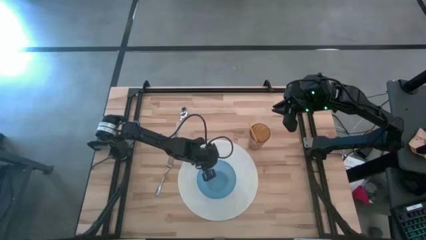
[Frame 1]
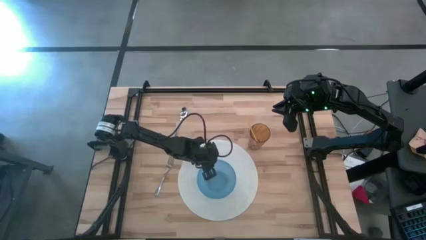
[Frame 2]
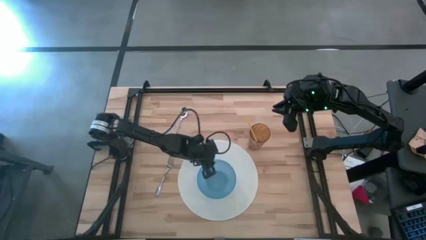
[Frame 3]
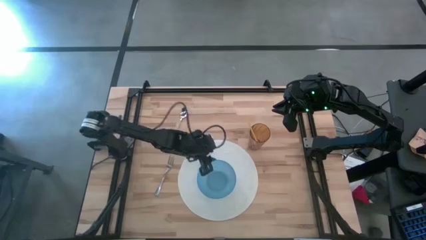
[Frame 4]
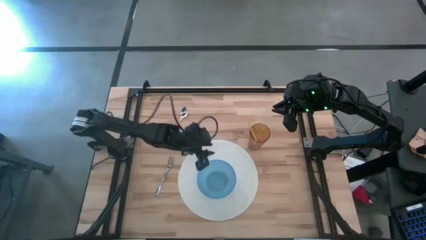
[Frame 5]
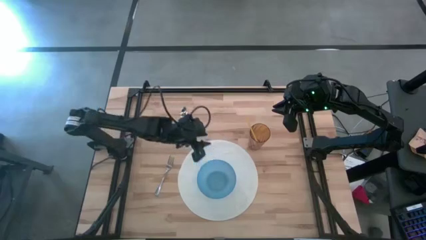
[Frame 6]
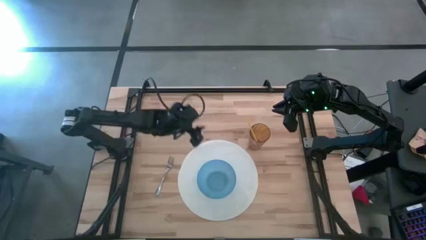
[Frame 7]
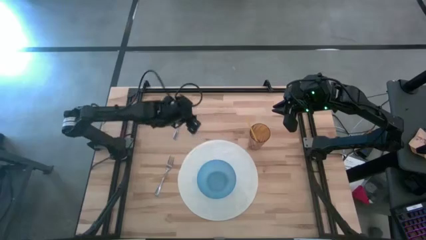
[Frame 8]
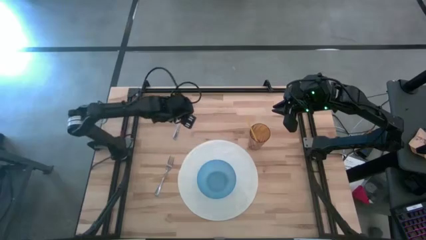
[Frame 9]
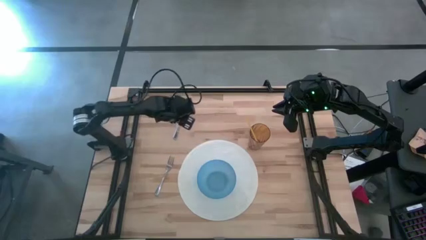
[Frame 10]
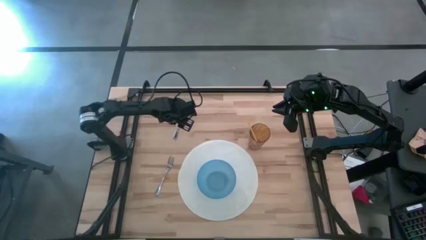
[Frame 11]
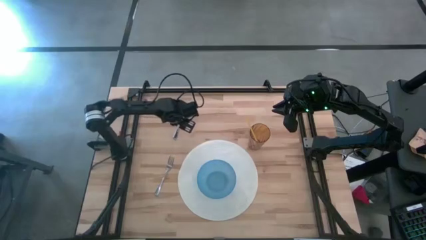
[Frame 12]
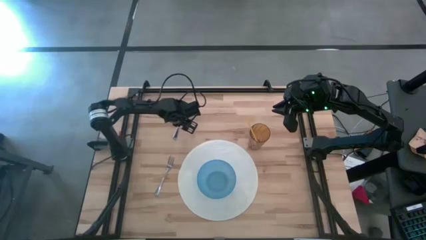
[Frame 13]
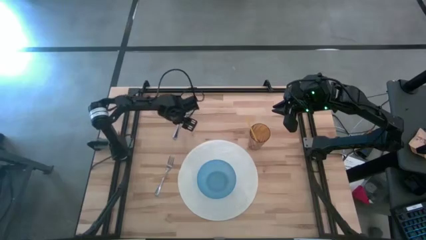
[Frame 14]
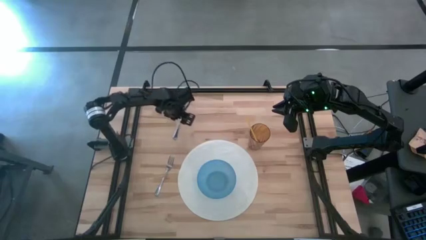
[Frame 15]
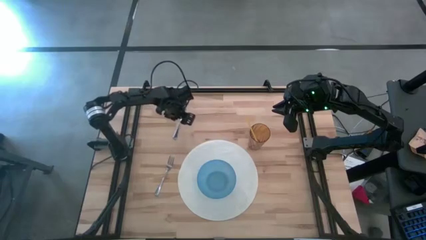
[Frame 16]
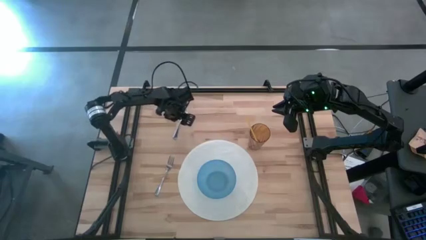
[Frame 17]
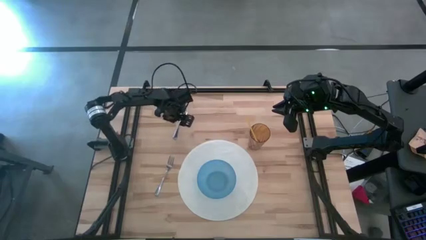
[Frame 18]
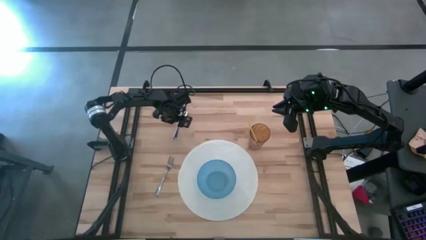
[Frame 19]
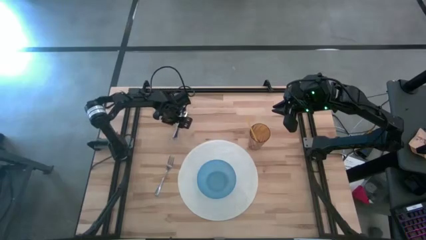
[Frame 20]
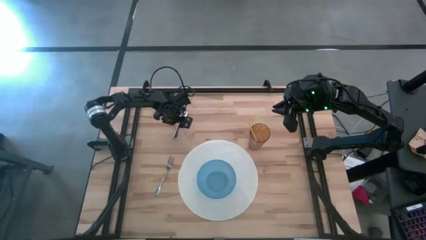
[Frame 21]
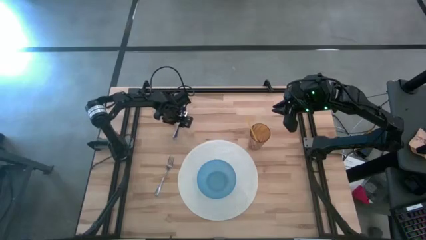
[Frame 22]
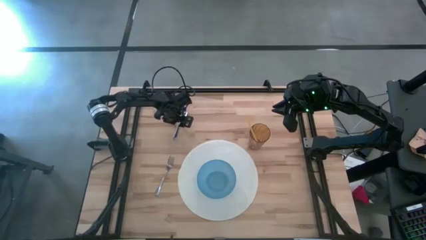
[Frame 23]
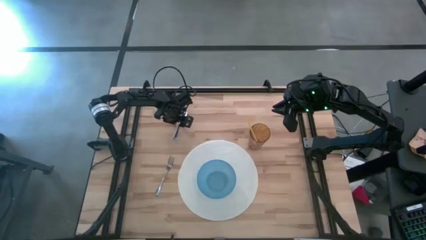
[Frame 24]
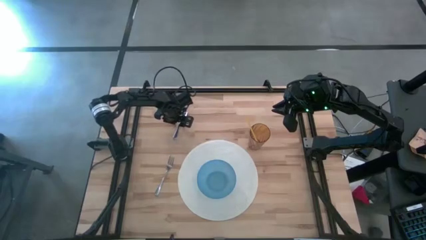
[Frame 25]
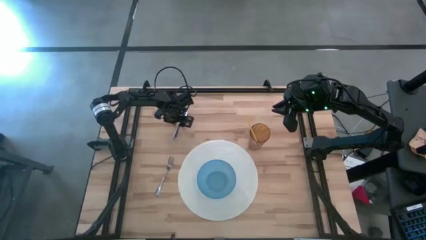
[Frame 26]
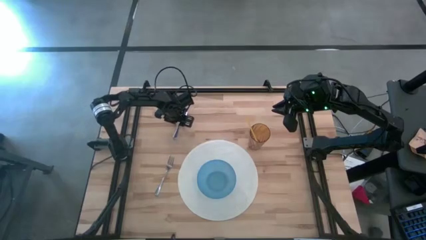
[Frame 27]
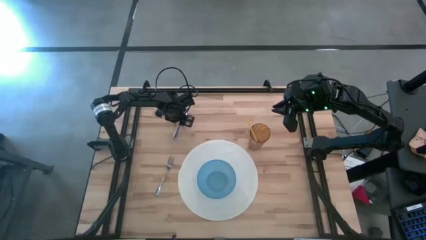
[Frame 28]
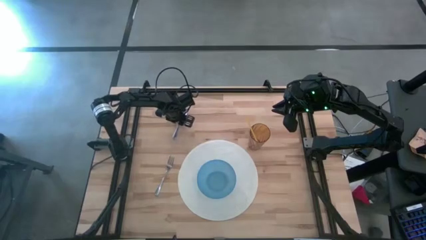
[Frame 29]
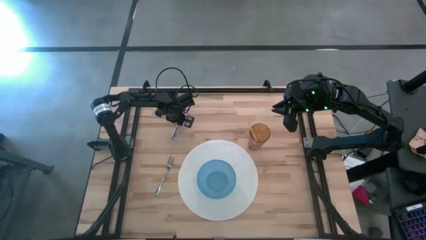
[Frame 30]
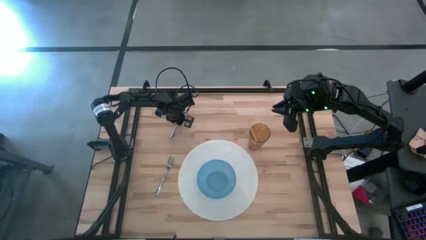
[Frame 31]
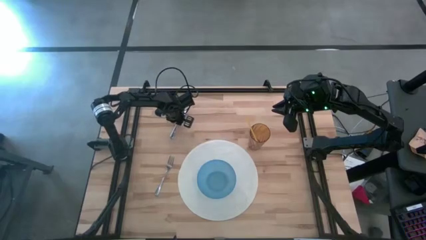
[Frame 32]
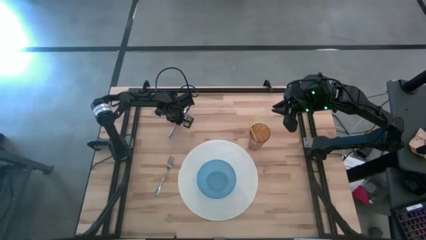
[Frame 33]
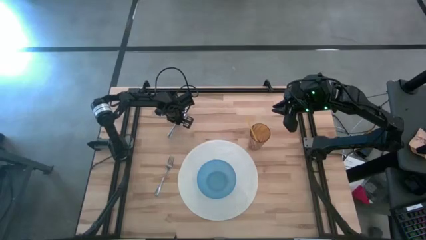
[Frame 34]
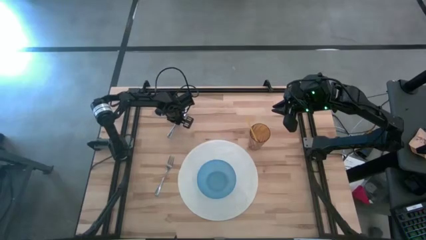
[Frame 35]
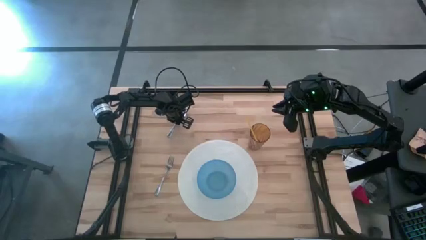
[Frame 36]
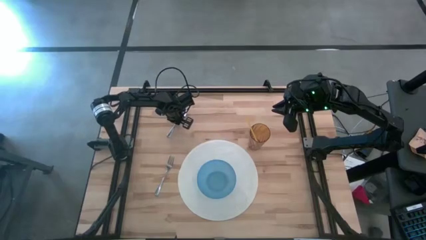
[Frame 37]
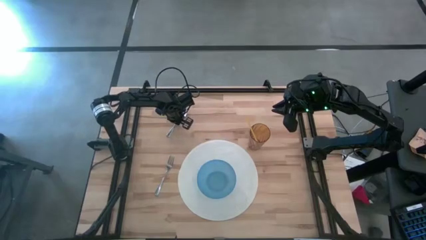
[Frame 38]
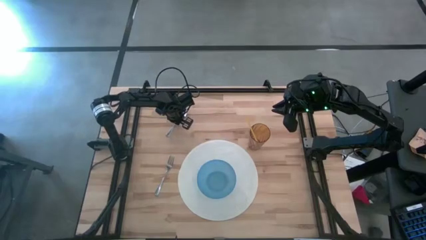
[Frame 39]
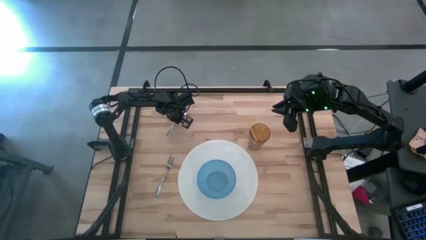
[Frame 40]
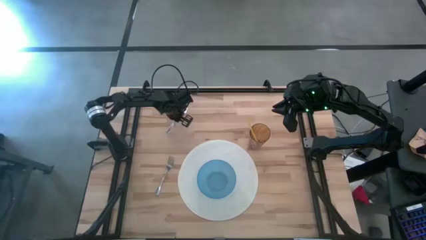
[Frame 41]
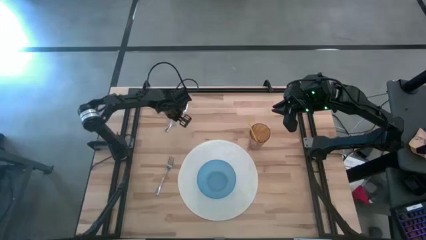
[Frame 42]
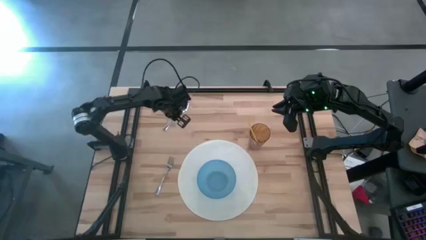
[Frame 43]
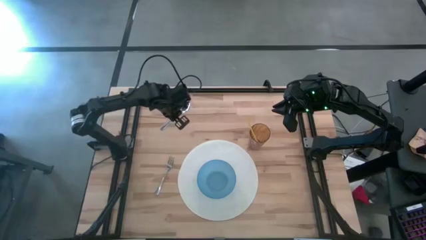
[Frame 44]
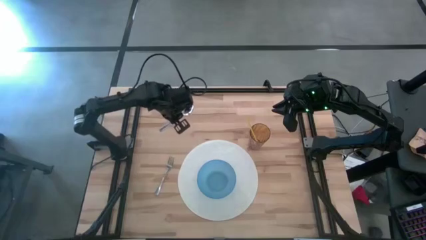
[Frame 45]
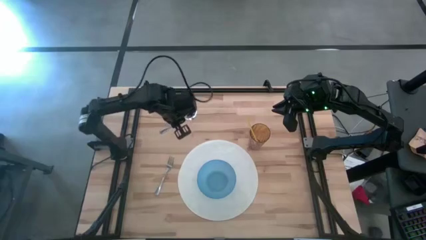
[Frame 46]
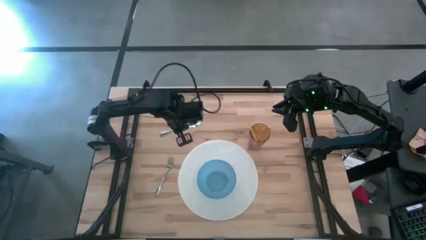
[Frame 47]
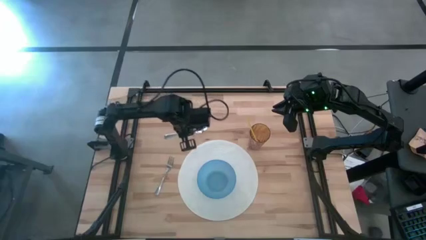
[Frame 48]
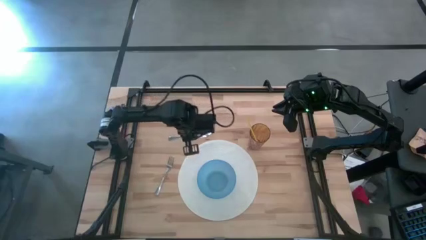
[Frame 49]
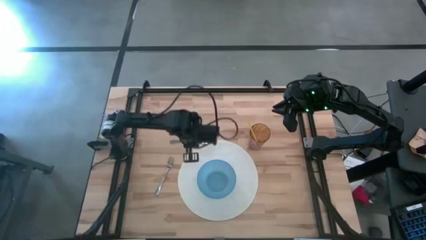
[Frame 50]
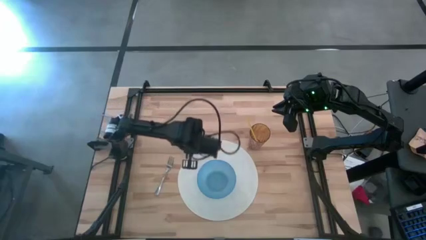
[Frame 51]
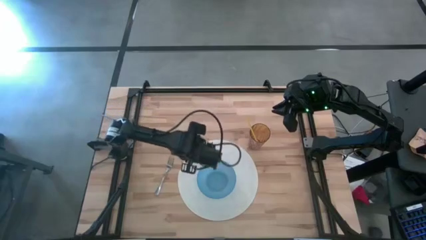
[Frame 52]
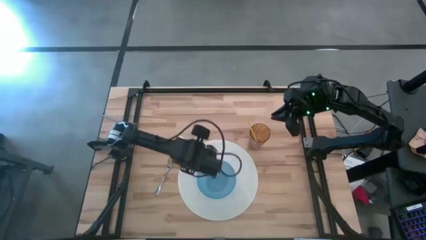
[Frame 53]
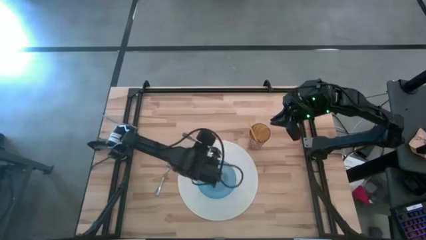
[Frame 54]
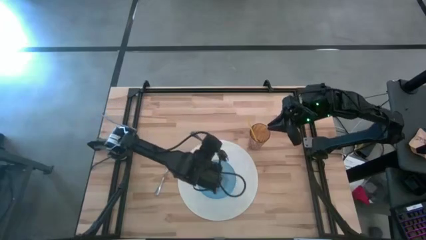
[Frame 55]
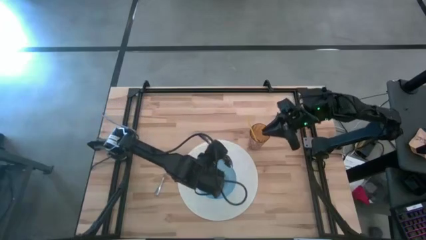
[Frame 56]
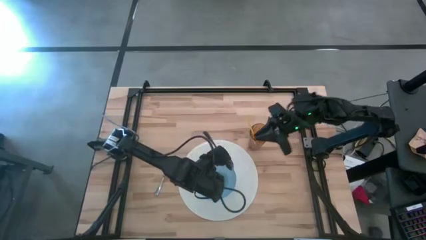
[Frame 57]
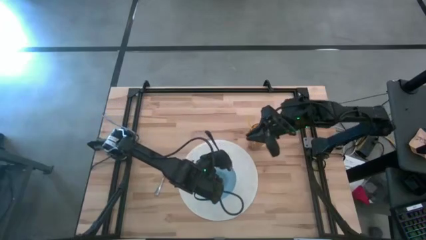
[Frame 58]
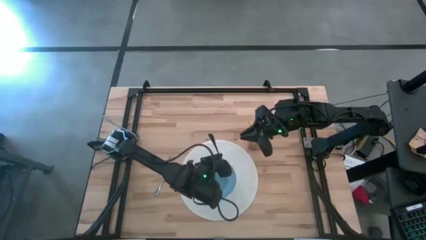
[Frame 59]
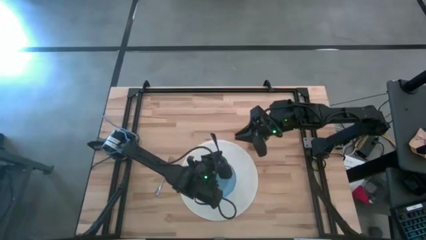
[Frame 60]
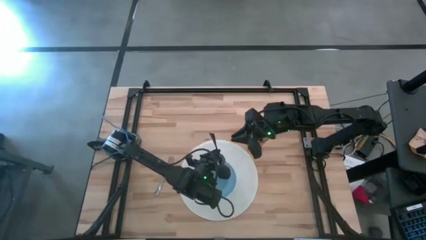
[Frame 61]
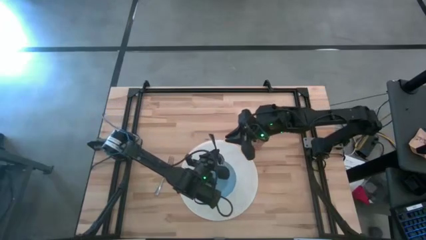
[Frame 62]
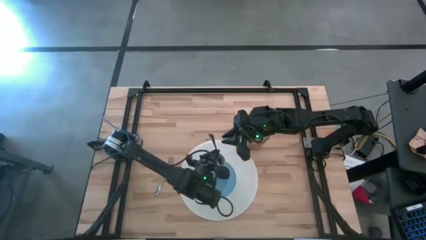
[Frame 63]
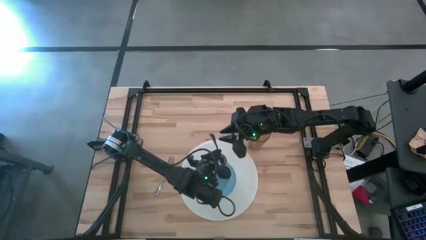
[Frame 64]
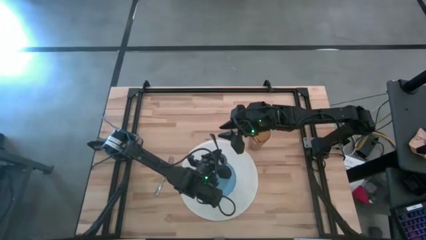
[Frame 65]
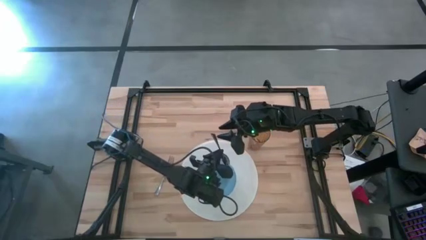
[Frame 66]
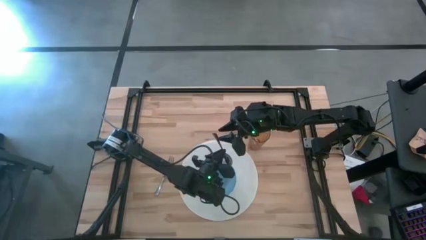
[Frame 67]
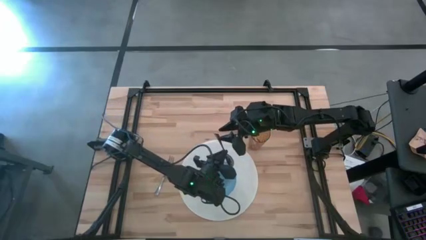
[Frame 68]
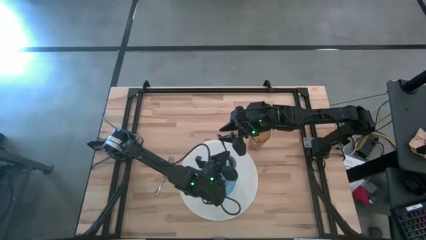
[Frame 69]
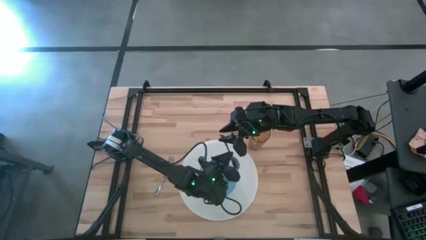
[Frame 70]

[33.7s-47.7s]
Task: Pick & Place Utensil
Put the silver spoon into the blue bowl on the white mat
